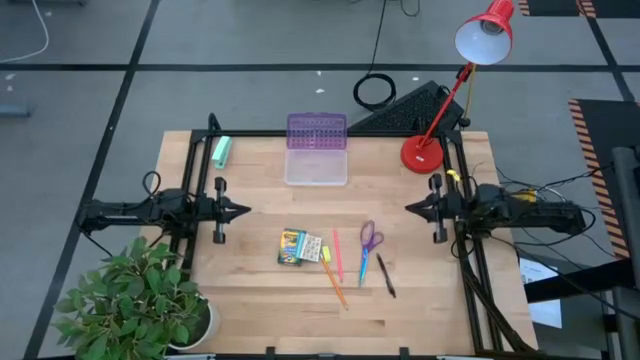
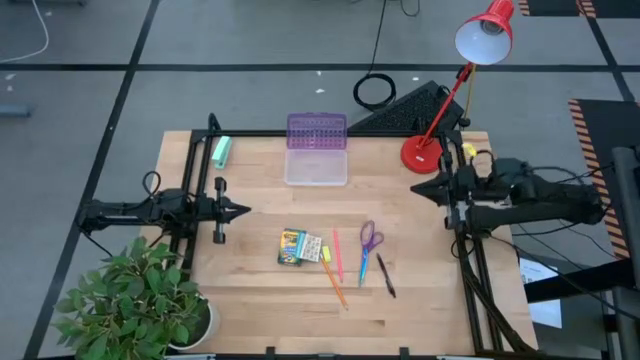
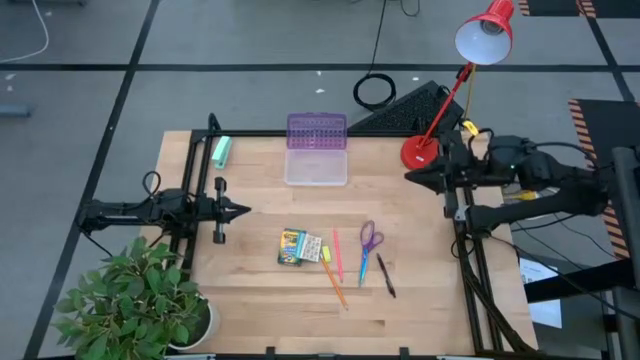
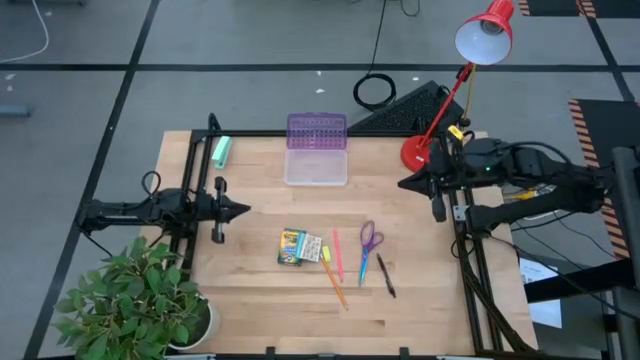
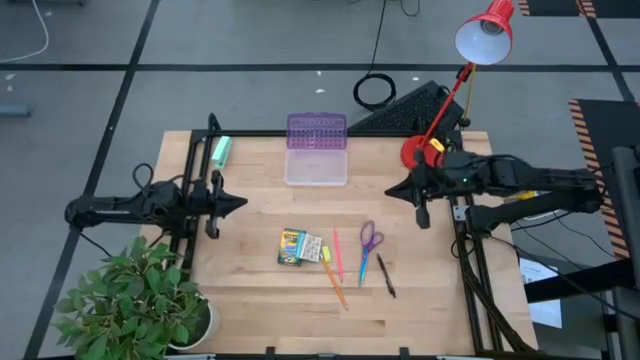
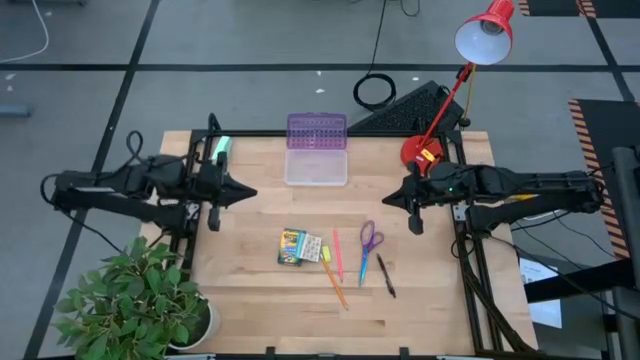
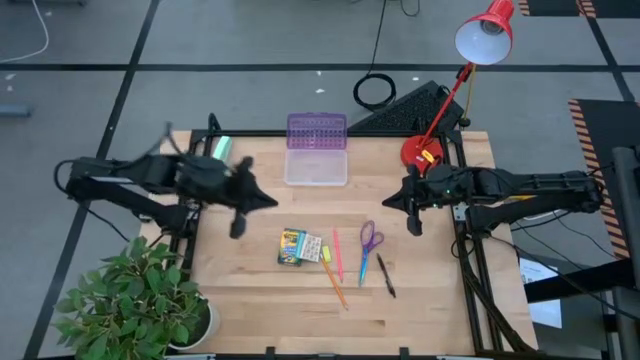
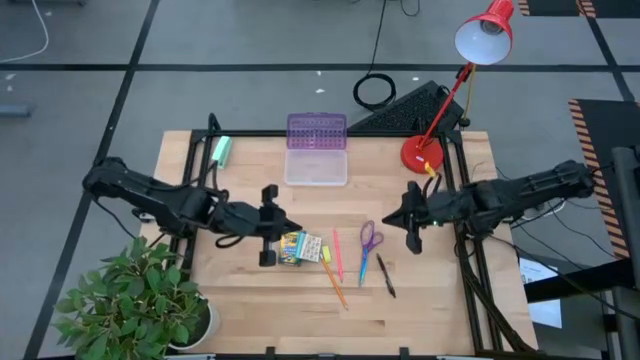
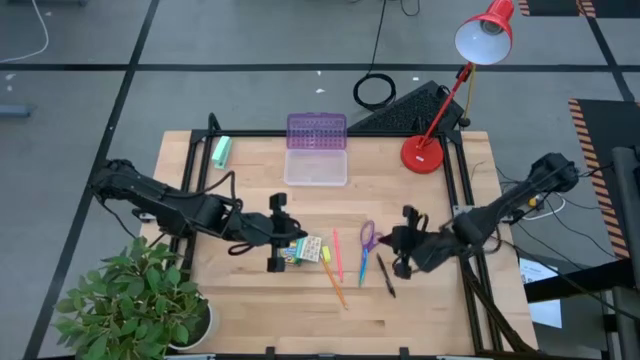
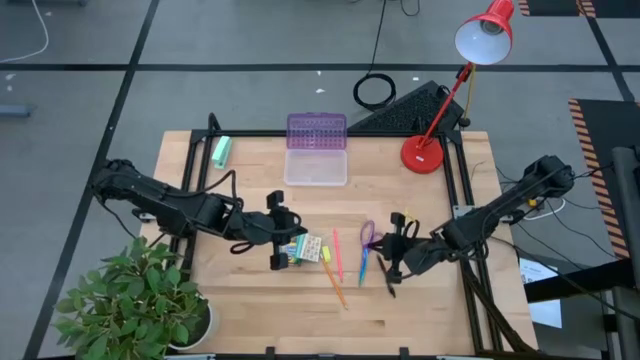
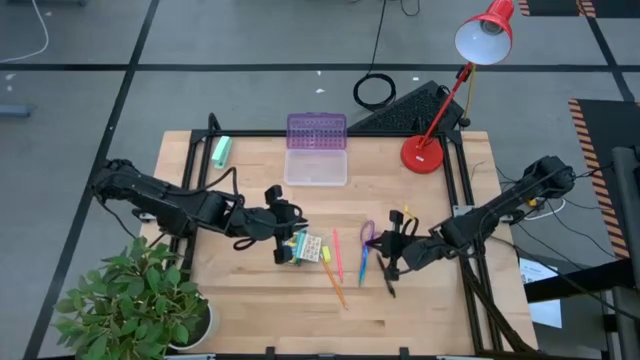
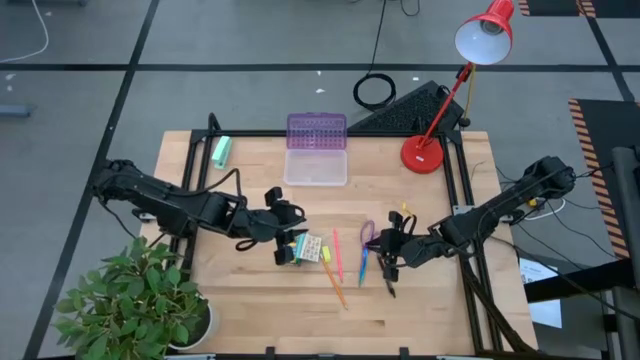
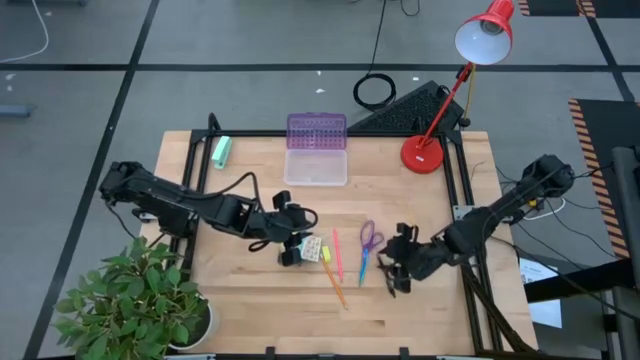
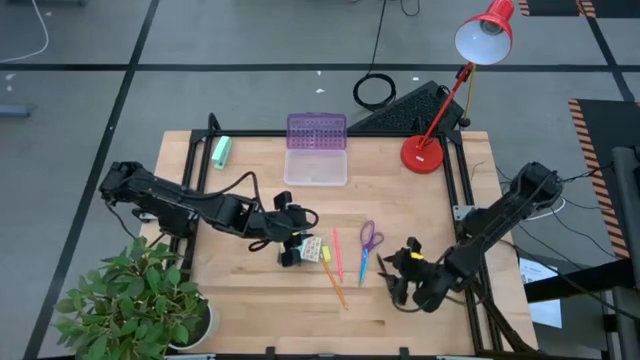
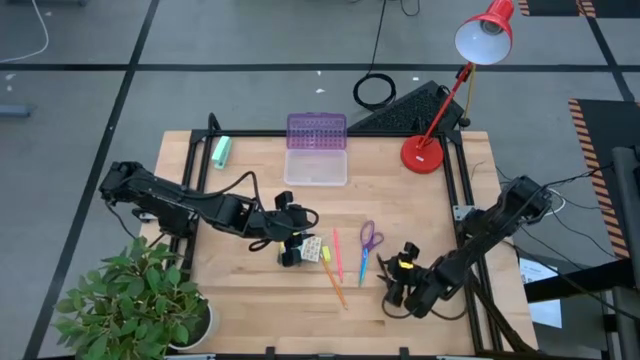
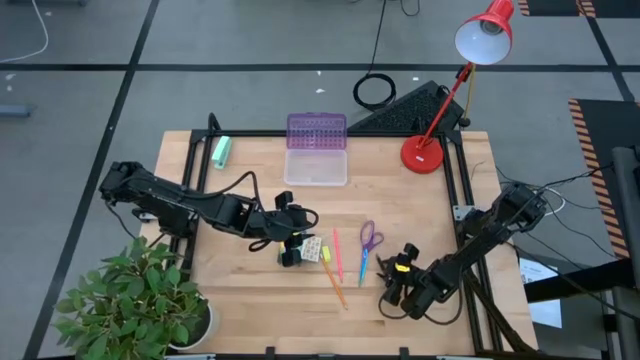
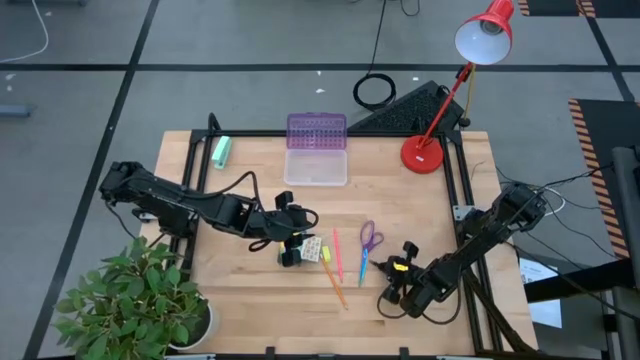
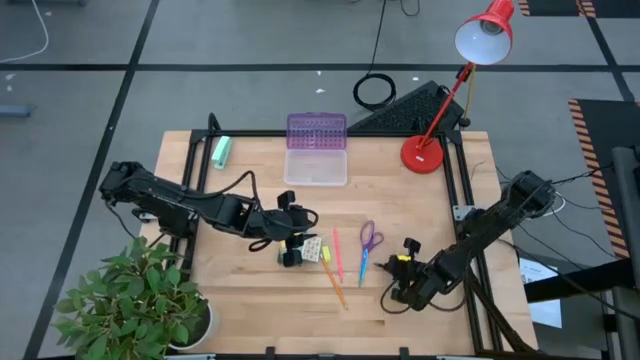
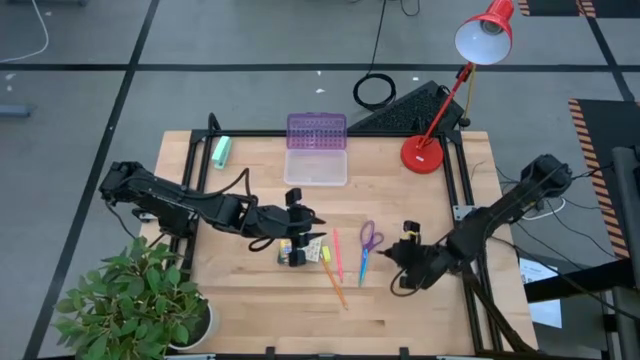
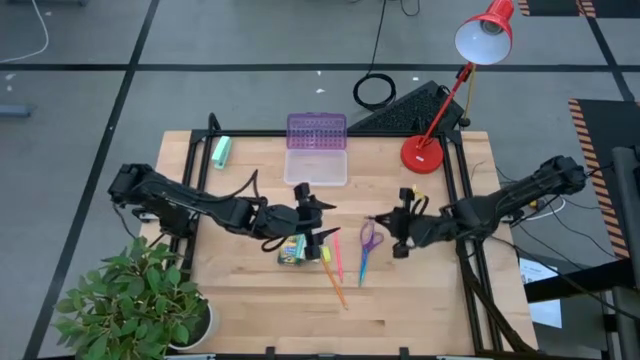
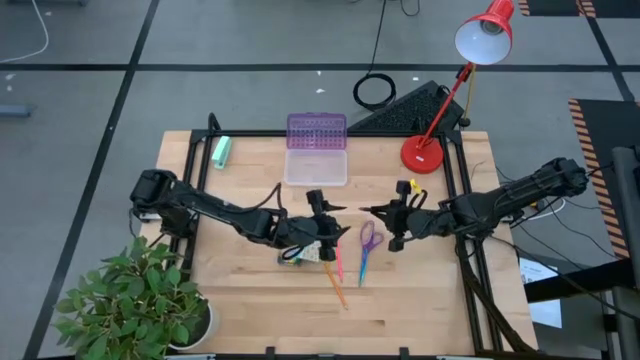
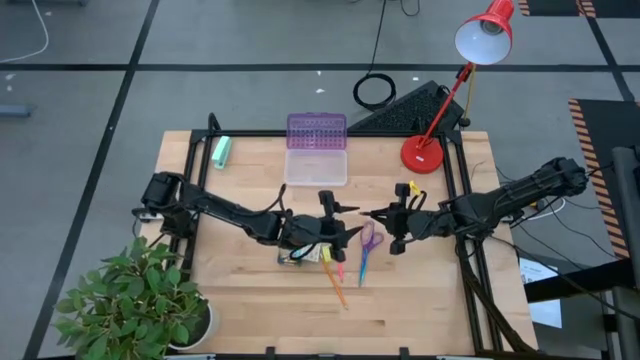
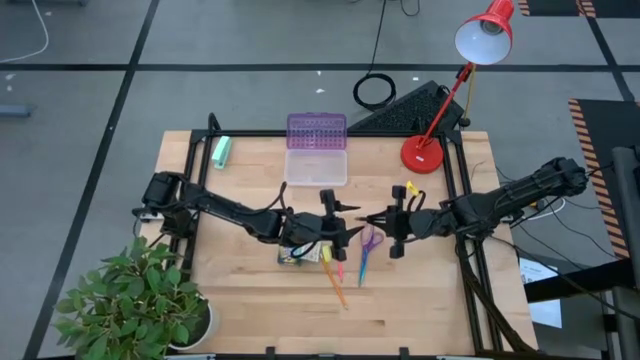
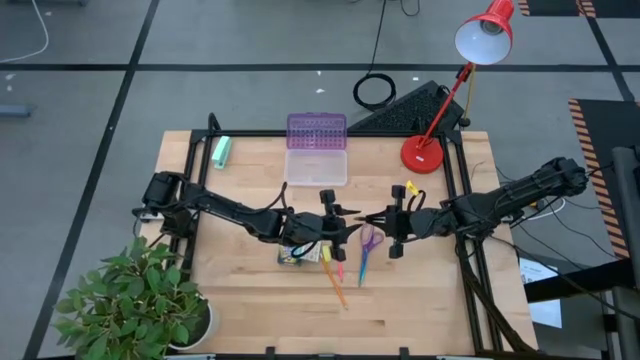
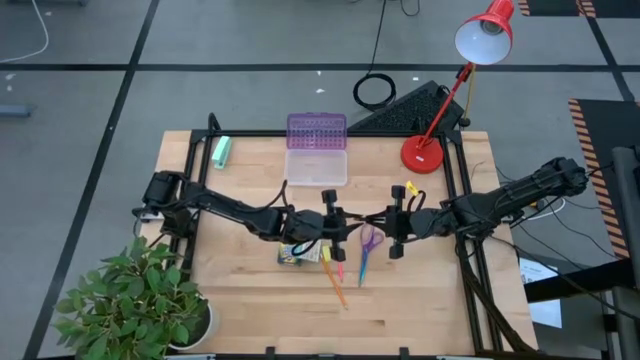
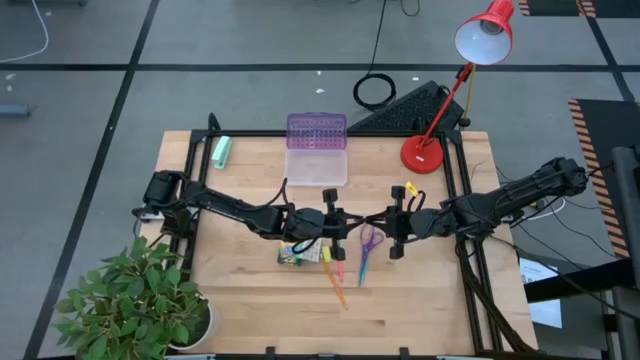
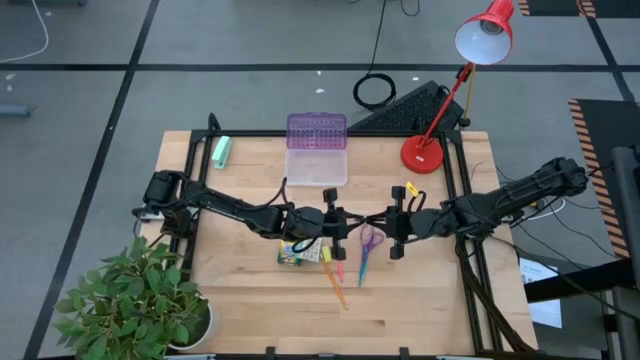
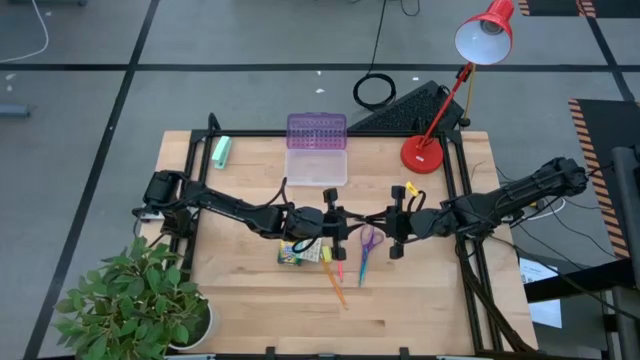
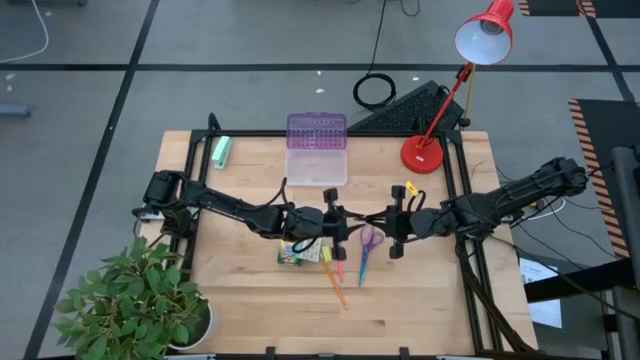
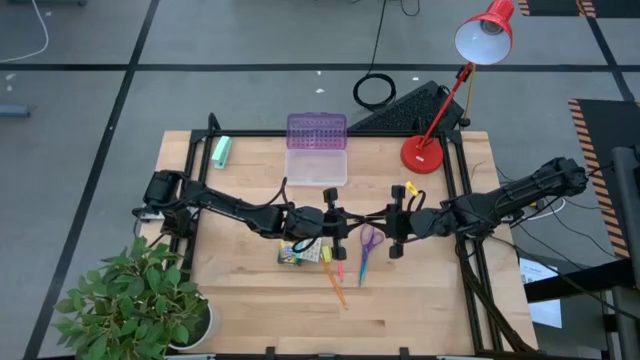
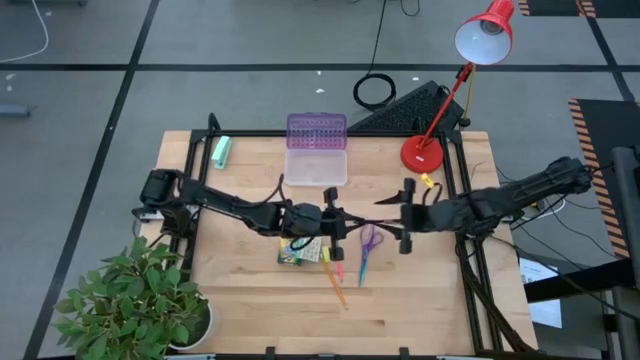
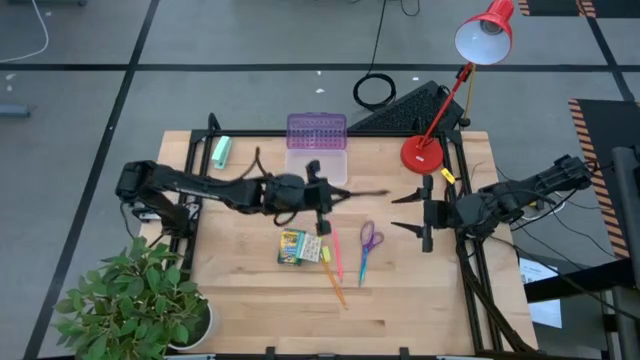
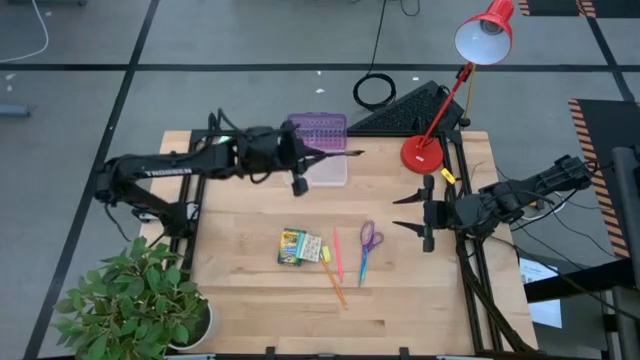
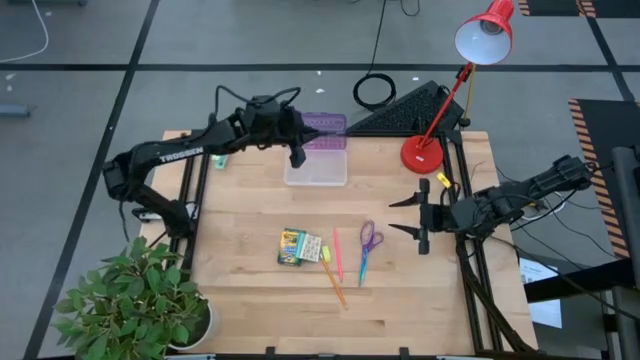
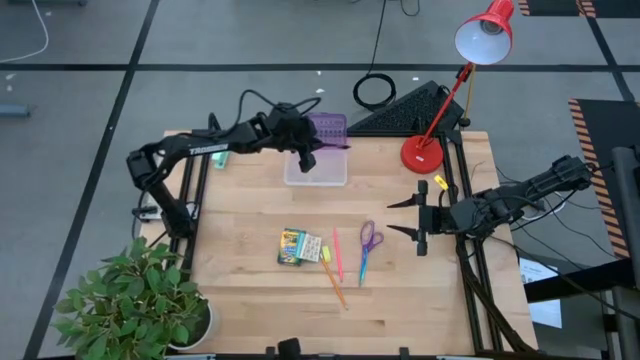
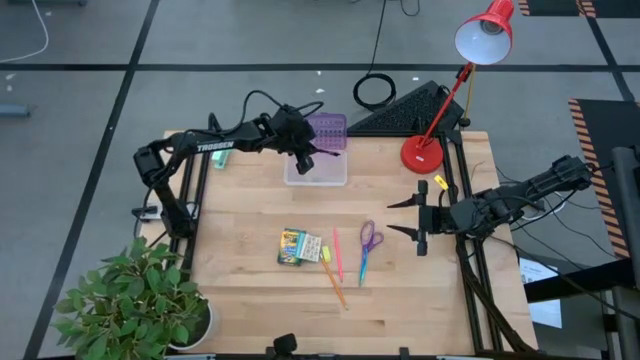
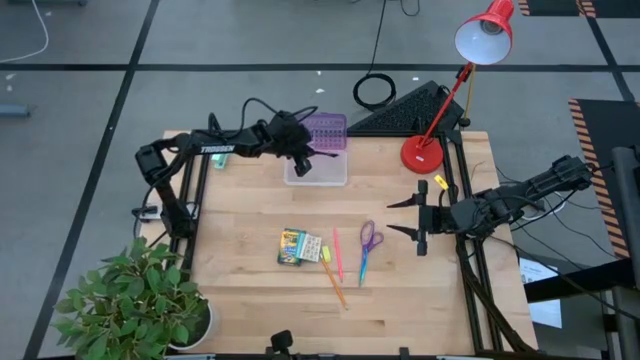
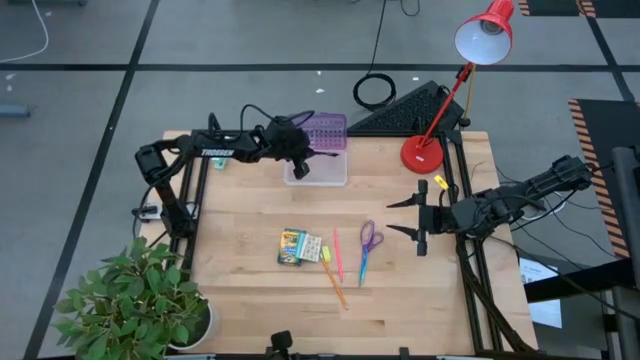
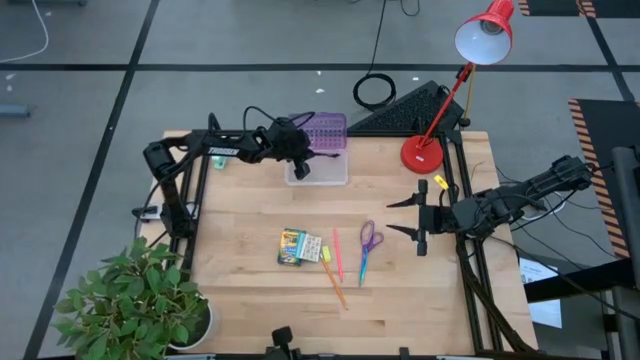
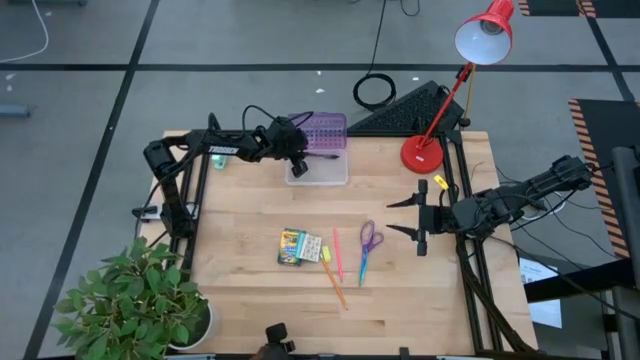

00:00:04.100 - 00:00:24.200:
Task: Pack school essentials
Put the black pen into the purple supply box
